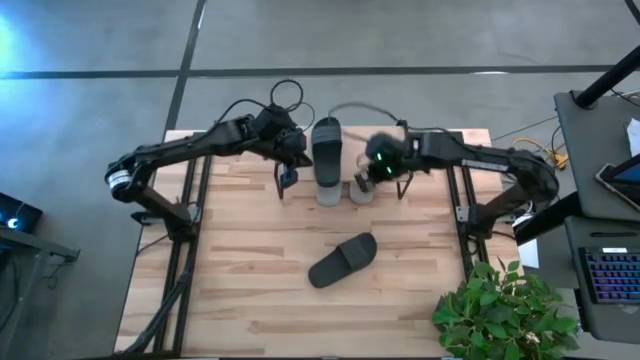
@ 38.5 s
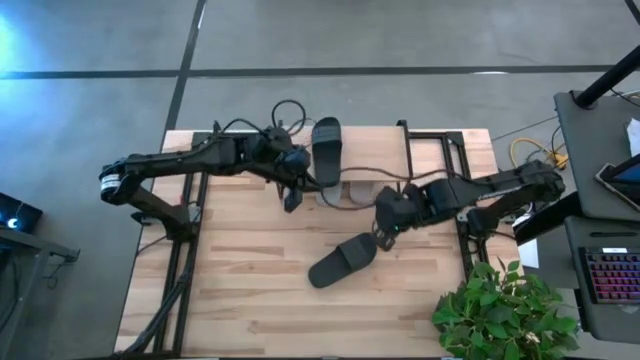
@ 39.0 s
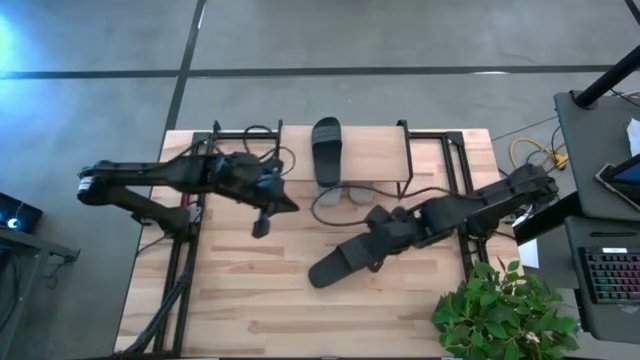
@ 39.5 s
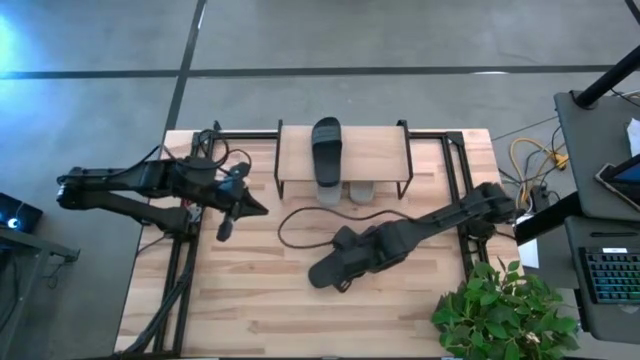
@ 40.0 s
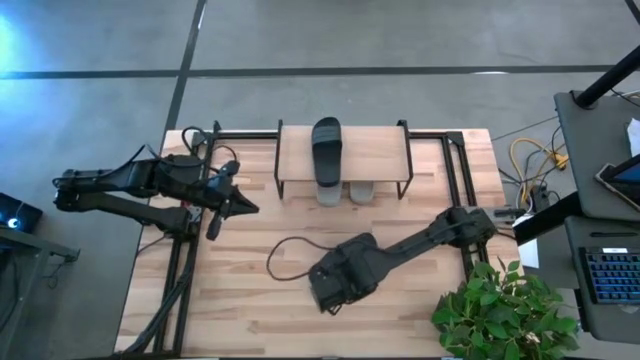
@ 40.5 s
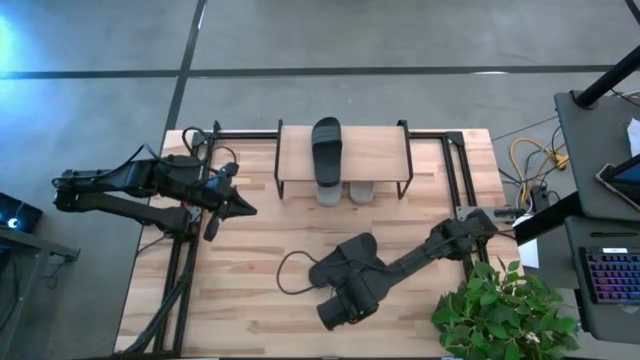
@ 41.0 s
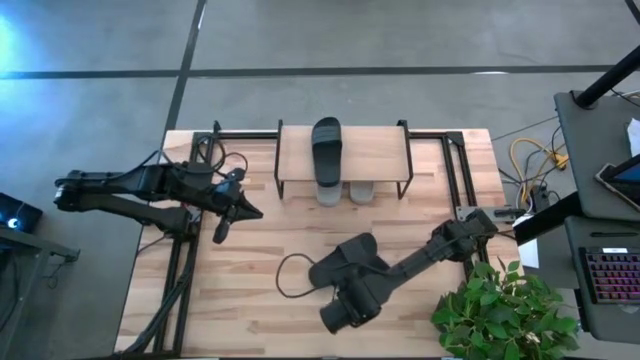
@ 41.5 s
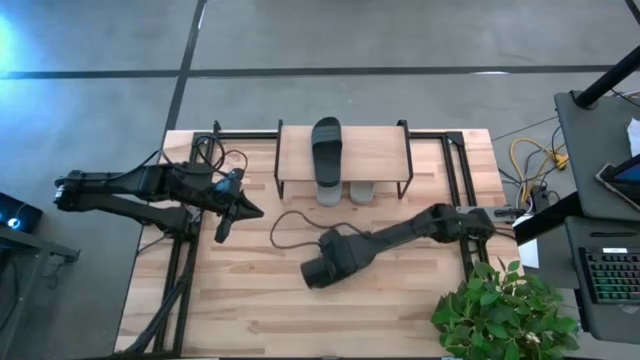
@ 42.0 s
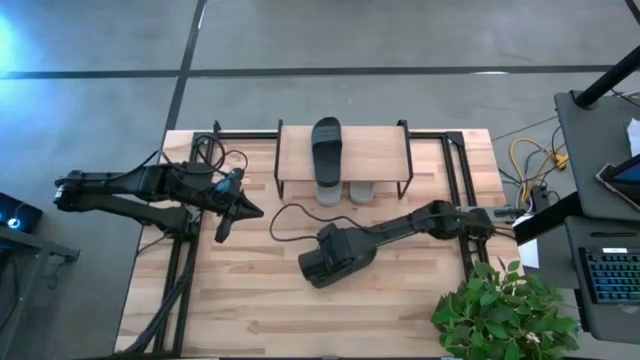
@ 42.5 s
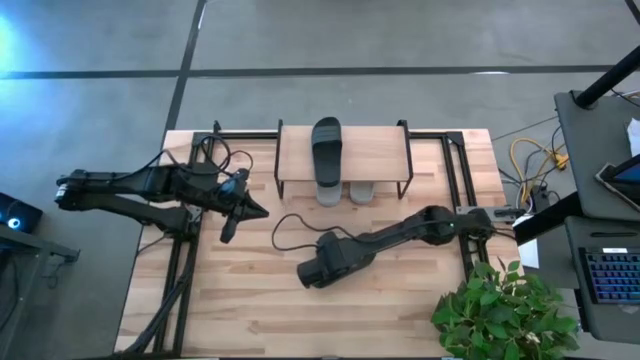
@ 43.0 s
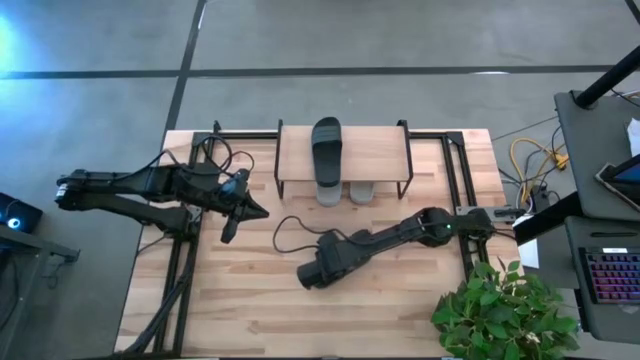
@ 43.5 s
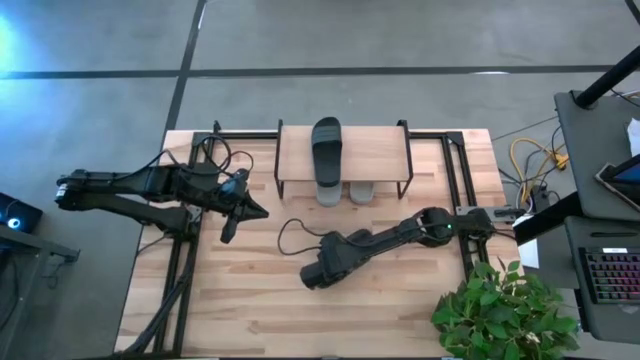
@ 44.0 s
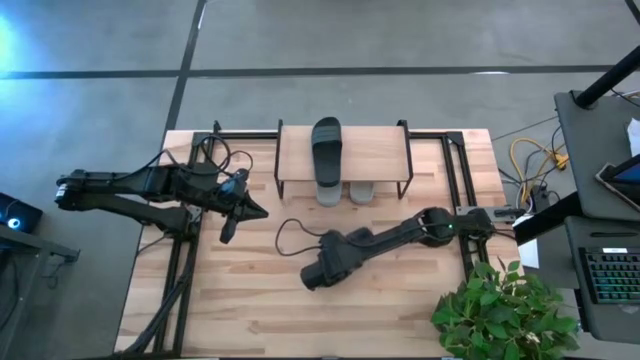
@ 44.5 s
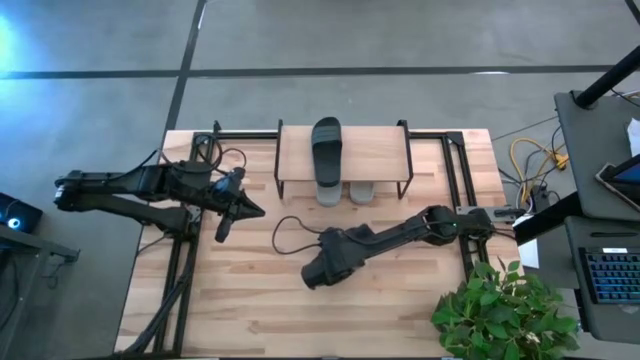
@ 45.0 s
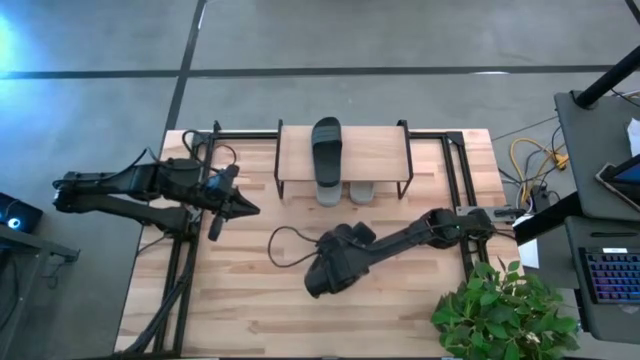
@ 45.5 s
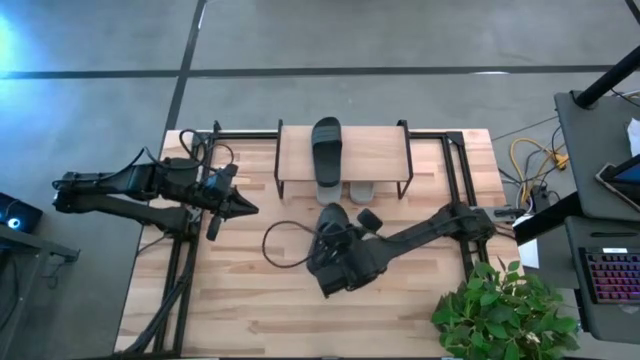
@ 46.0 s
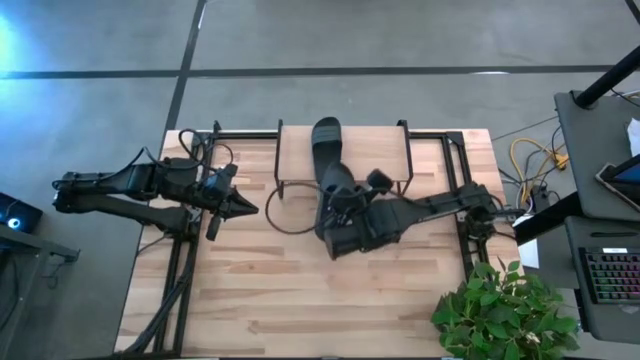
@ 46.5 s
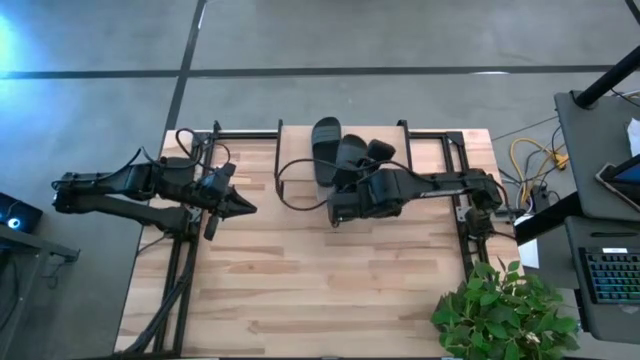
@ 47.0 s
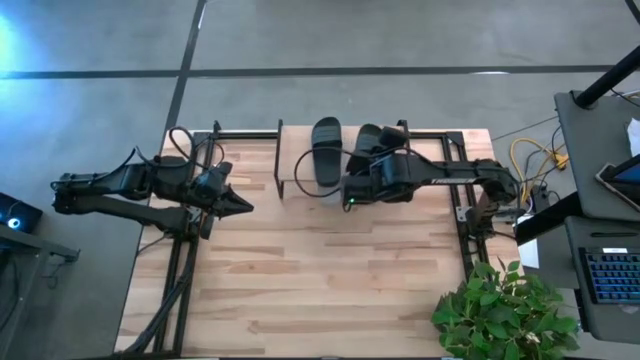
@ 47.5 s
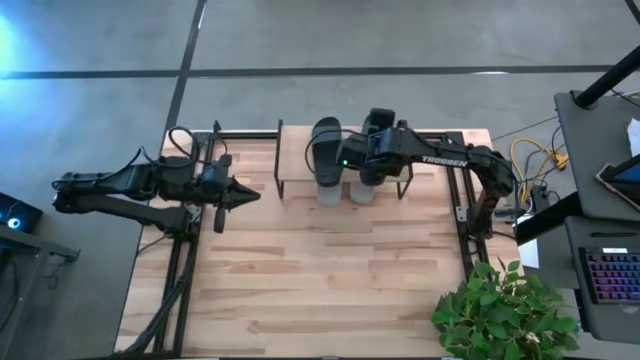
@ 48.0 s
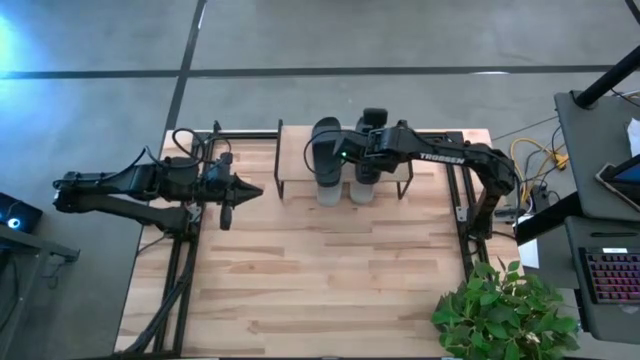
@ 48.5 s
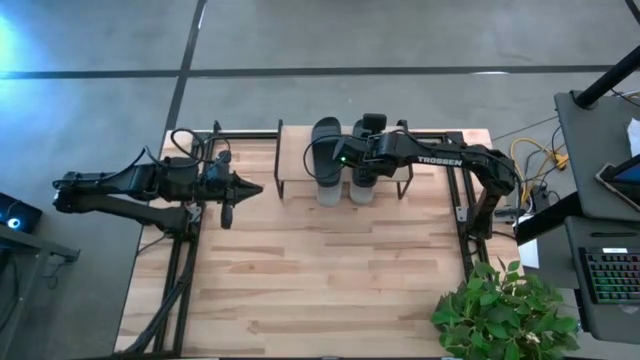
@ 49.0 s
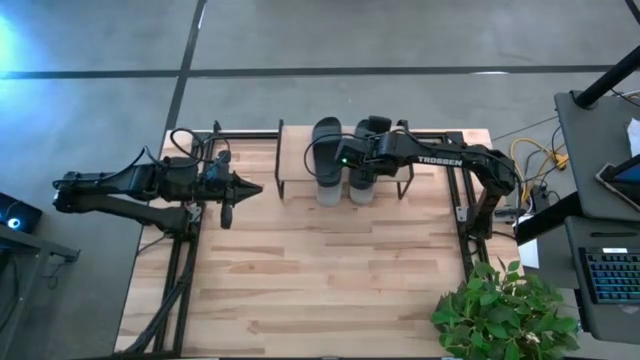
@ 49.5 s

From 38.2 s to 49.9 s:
Task: Pick and place slides into the shelf
Put the black slide on the shelf

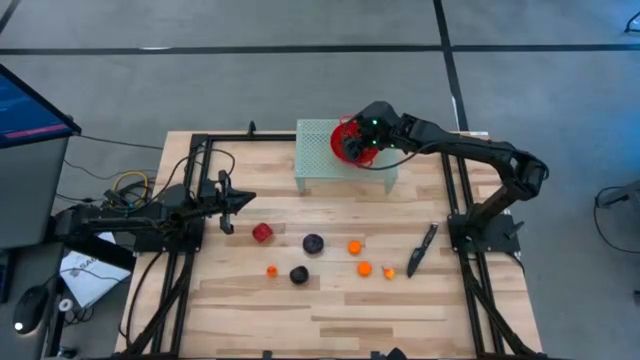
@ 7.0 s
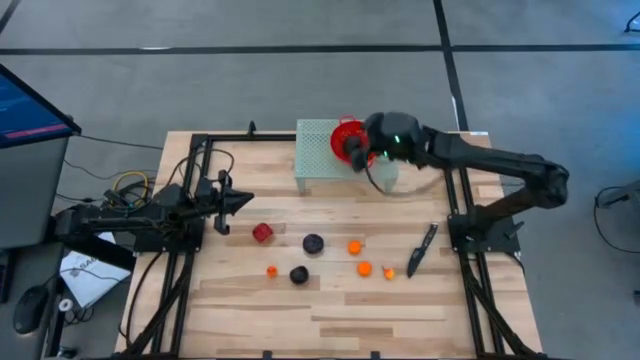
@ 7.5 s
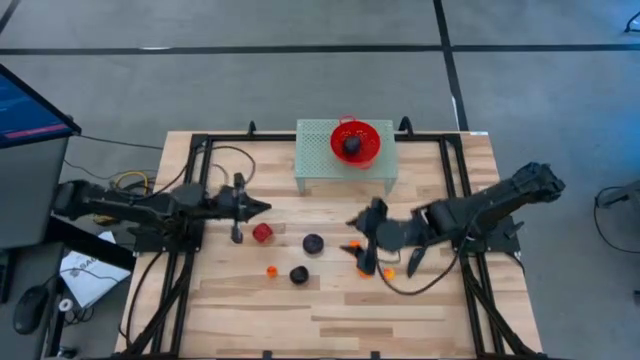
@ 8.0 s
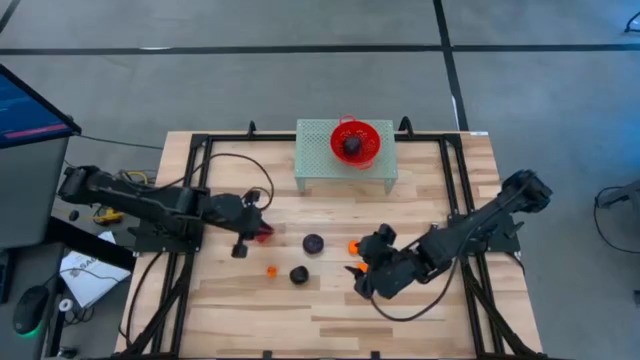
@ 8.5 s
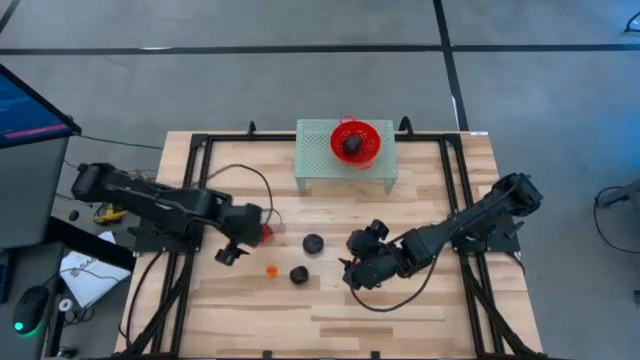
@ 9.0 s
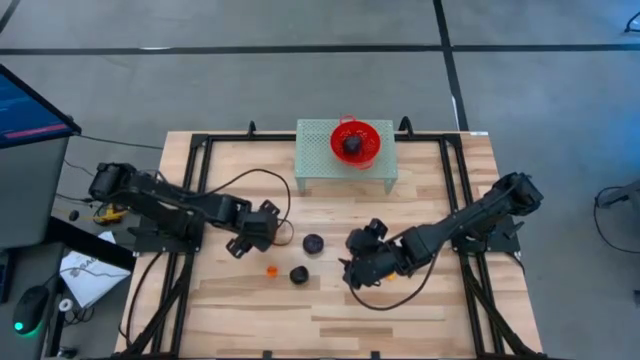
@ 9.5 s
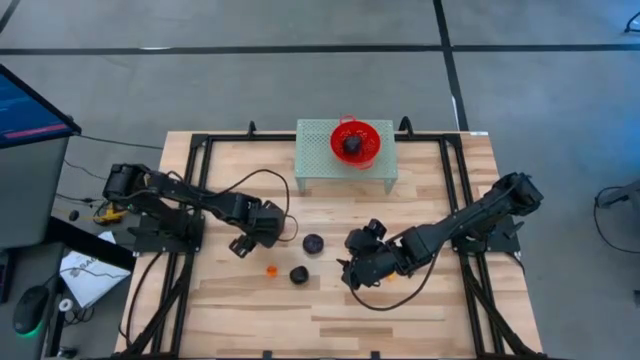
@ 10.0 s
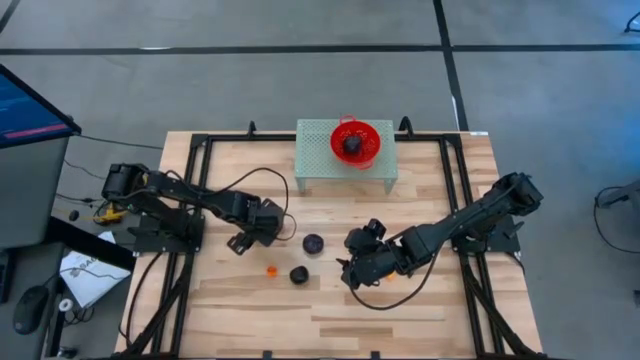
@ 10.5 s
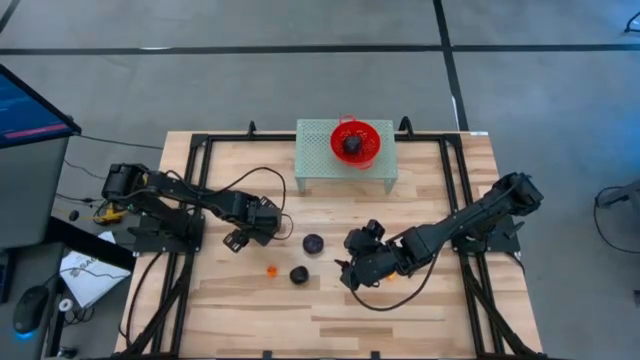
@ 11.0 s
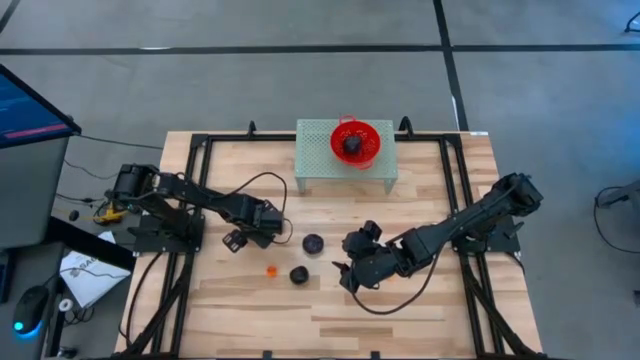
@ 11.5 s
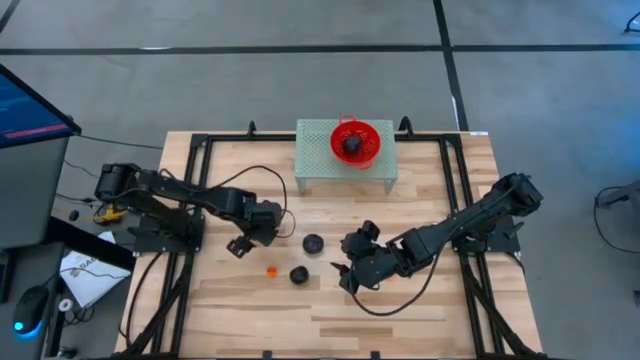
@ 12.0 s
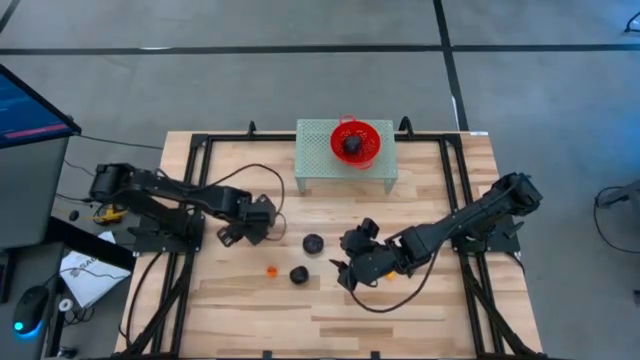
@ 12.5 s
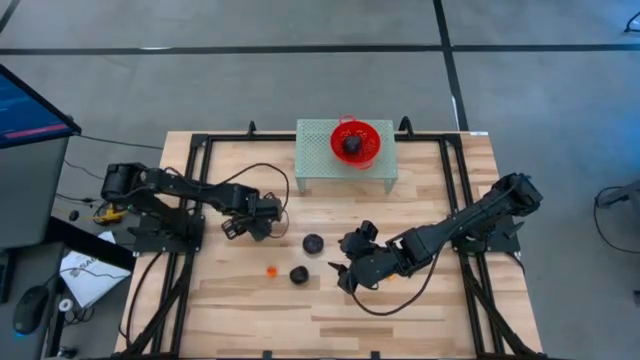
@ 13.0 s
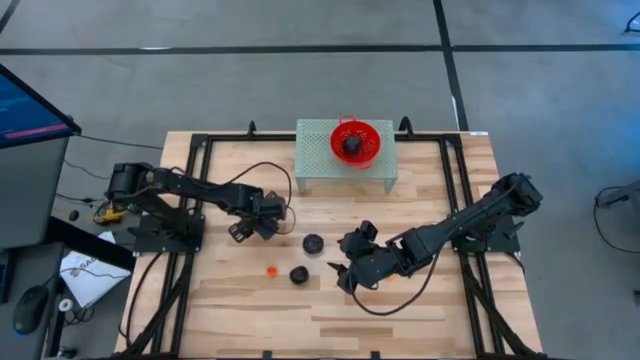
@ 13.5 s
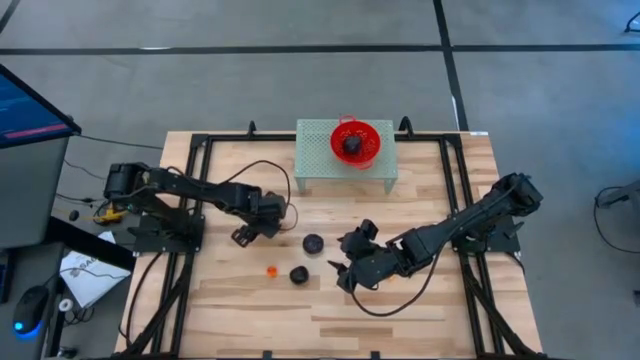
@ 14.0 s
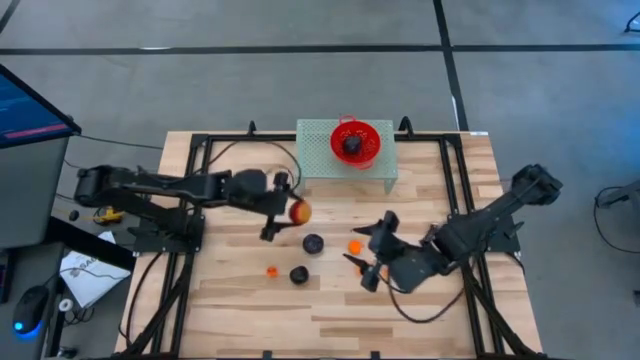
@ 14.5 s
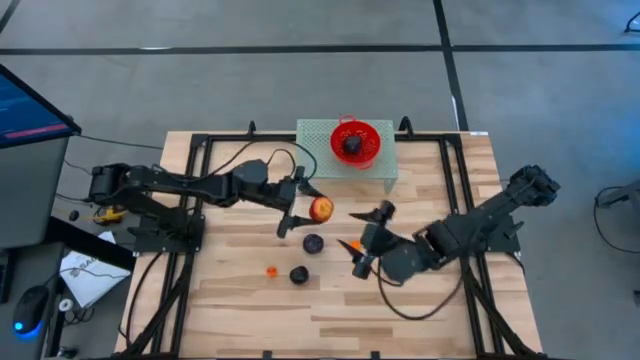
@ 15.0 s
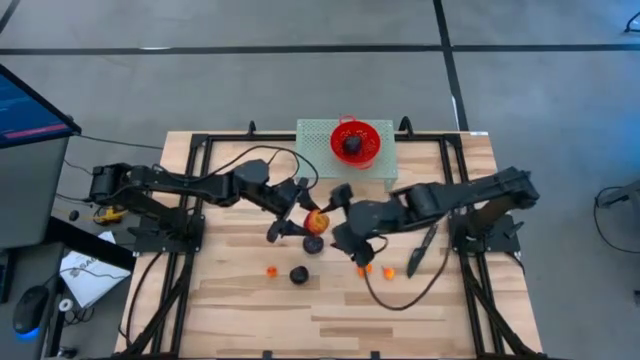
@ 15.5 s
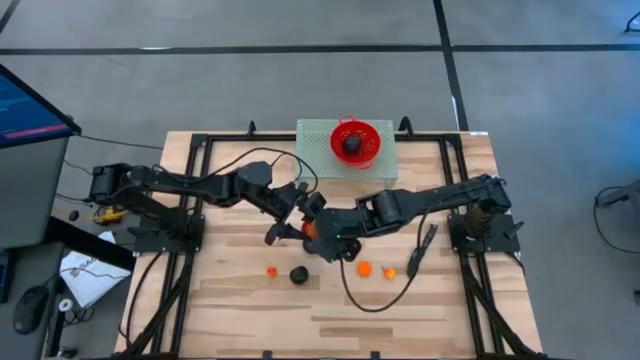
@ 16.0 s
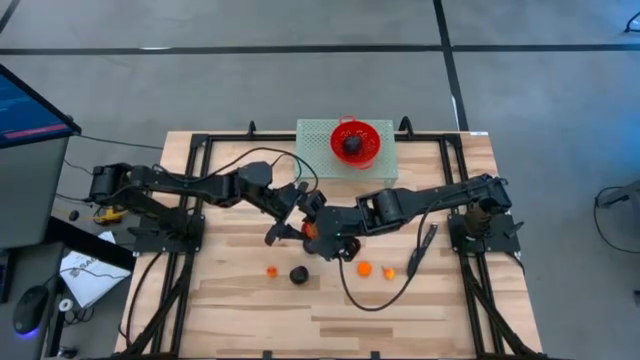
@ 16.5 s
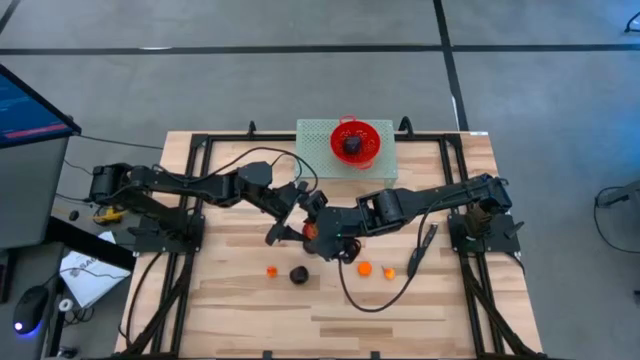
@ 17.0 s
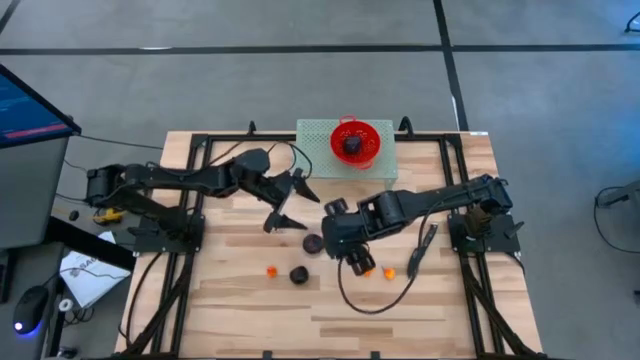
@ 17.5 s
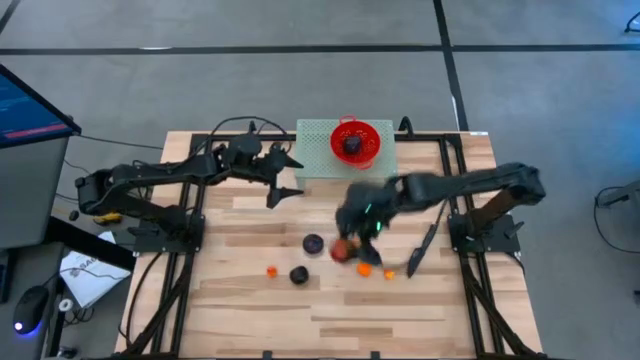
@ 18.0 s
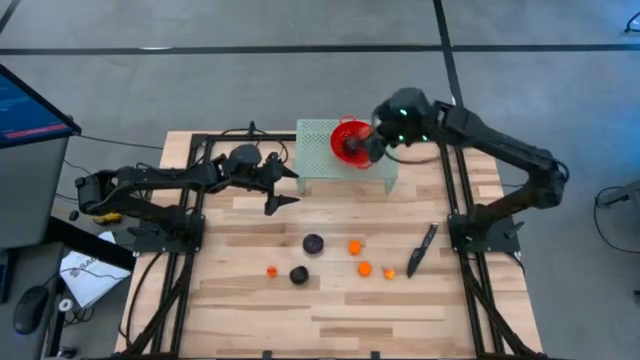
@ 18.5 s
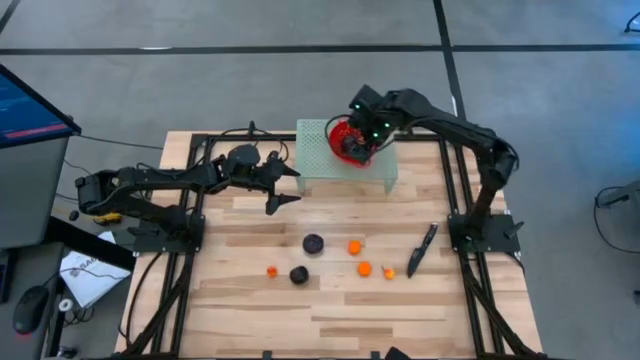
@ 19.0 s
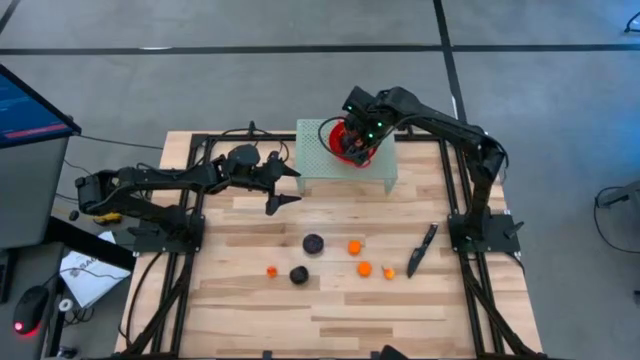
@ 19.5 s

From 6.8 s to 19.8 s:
Task: Pick & Place Fruit
Put the red apple into the red strainer bowl on the shelf
